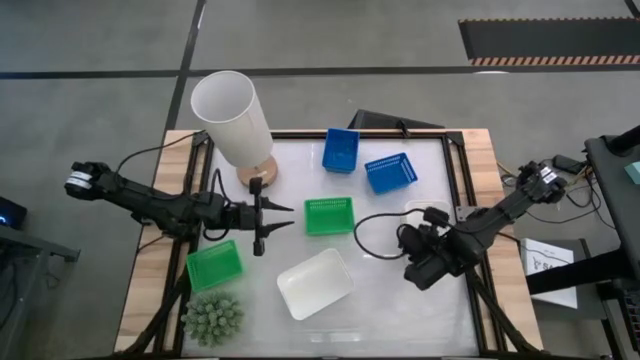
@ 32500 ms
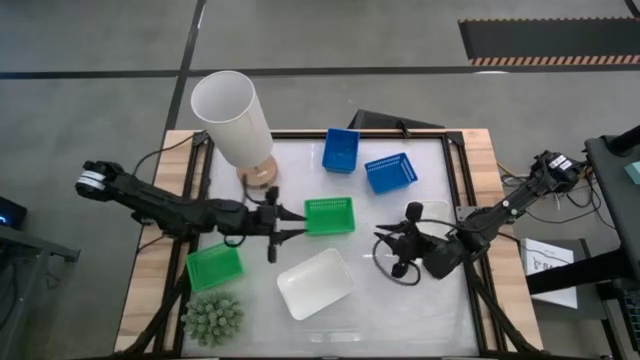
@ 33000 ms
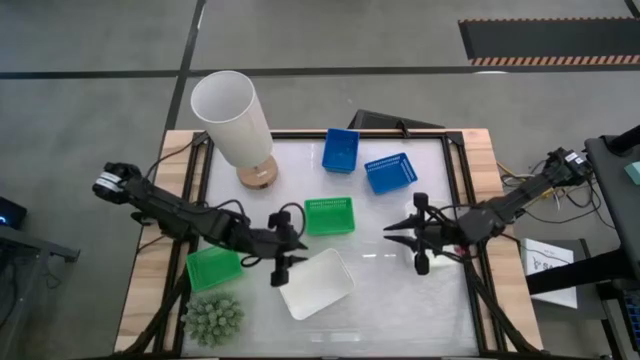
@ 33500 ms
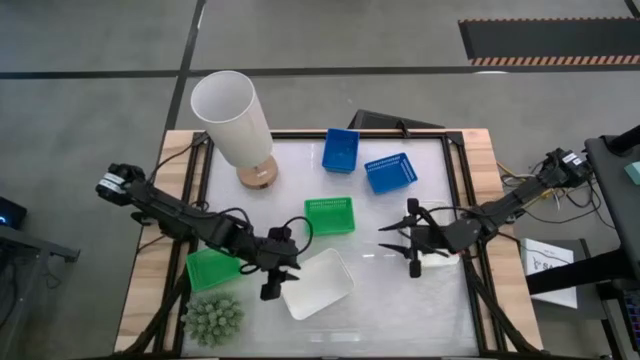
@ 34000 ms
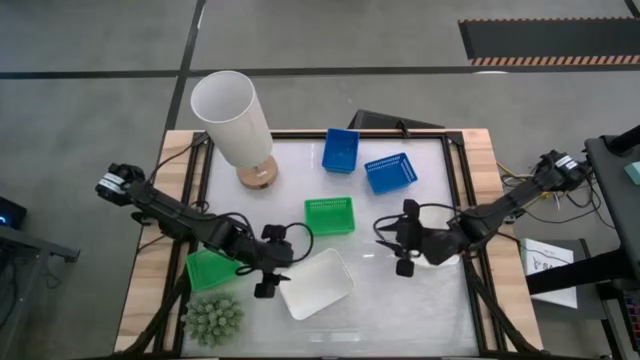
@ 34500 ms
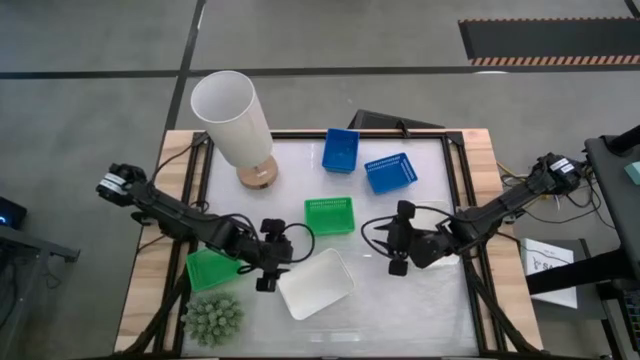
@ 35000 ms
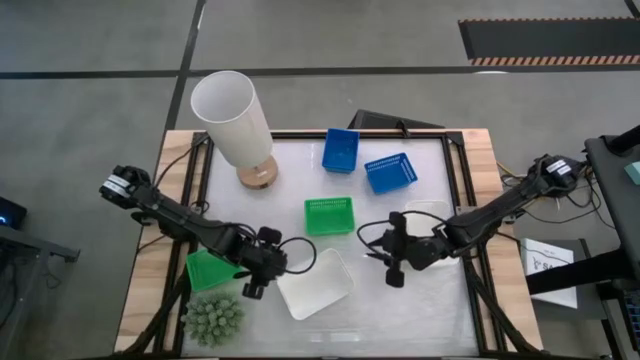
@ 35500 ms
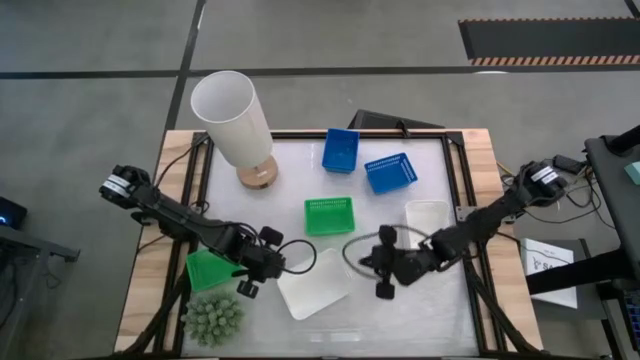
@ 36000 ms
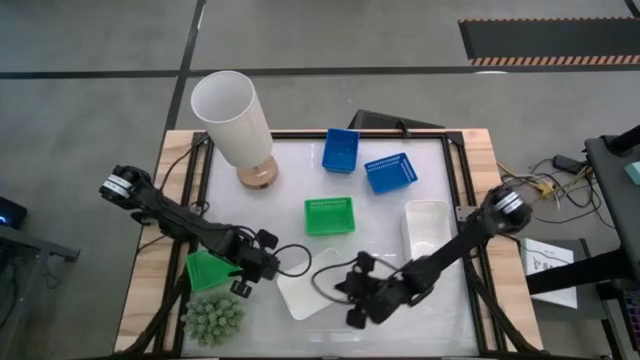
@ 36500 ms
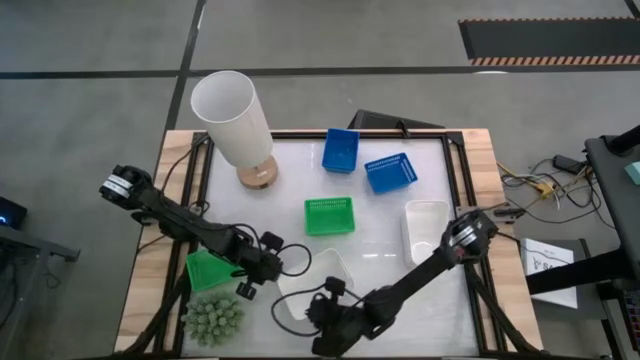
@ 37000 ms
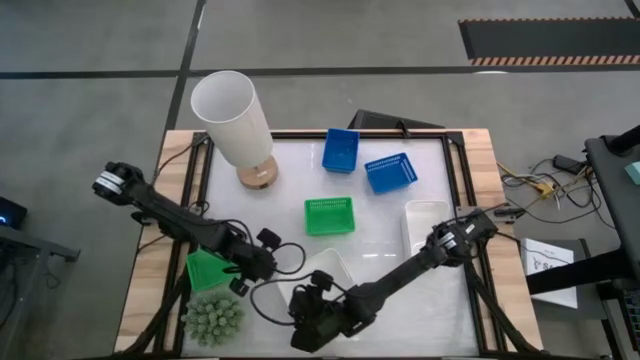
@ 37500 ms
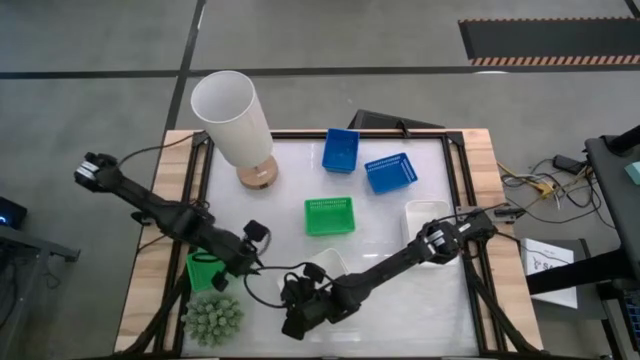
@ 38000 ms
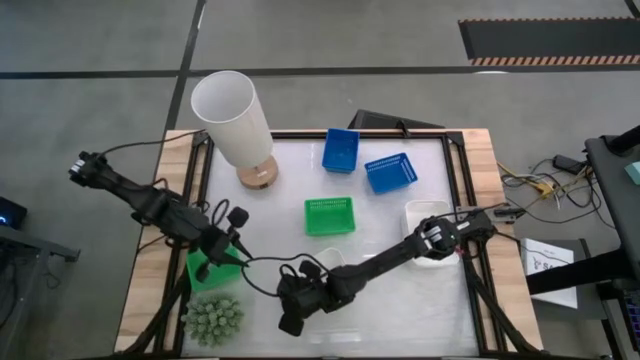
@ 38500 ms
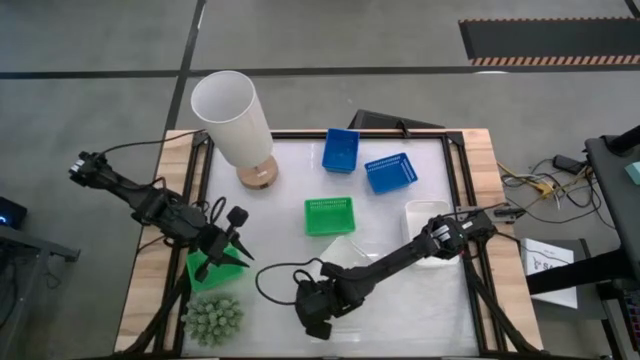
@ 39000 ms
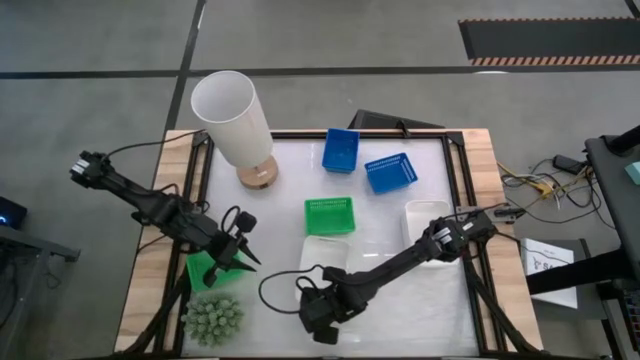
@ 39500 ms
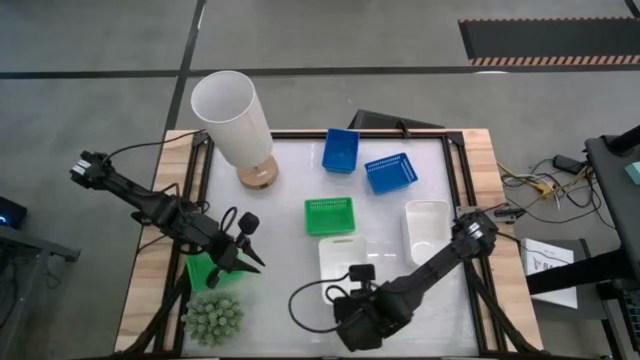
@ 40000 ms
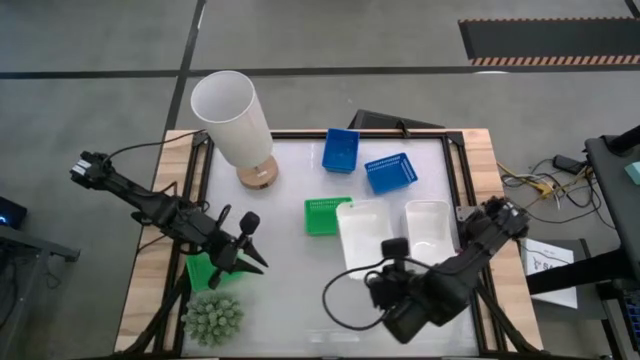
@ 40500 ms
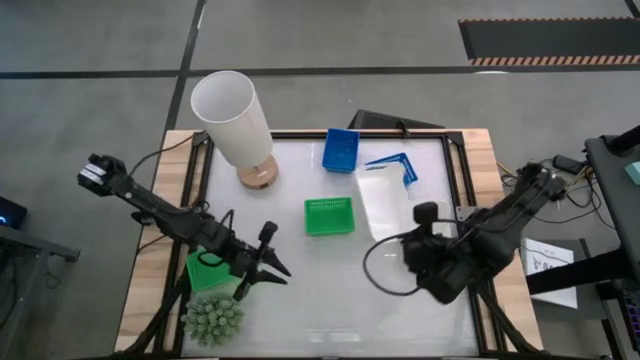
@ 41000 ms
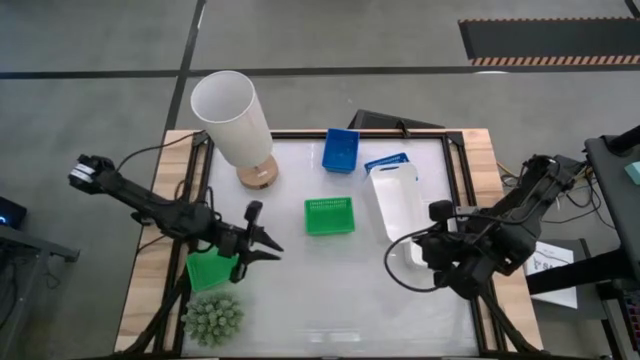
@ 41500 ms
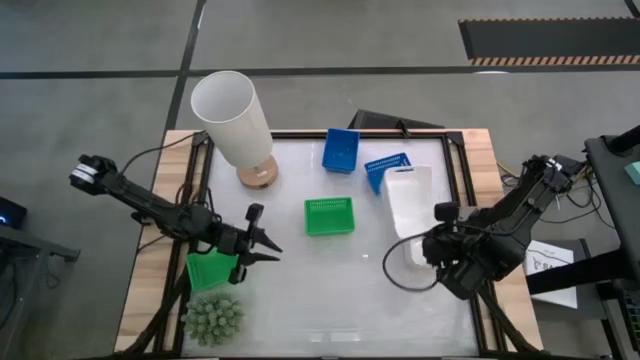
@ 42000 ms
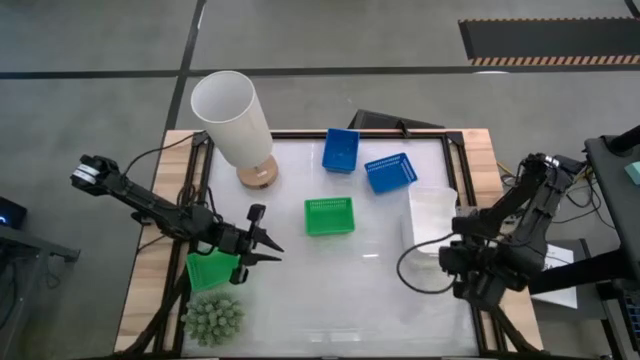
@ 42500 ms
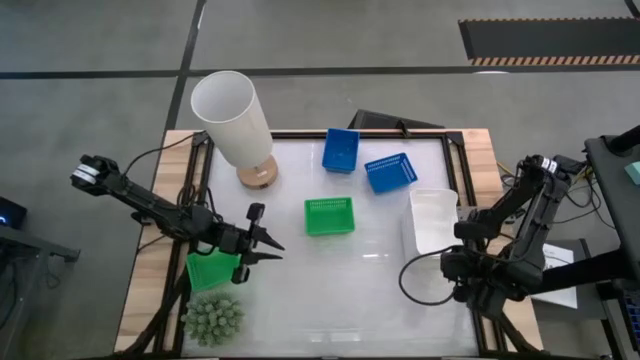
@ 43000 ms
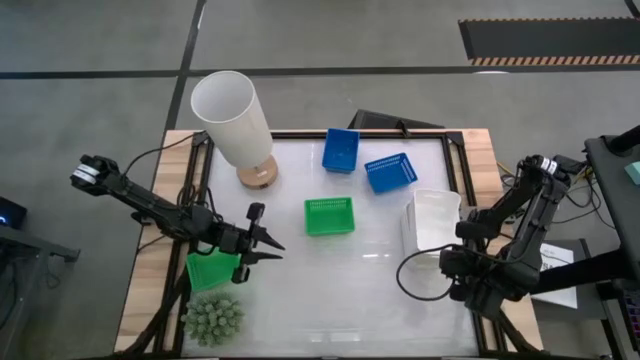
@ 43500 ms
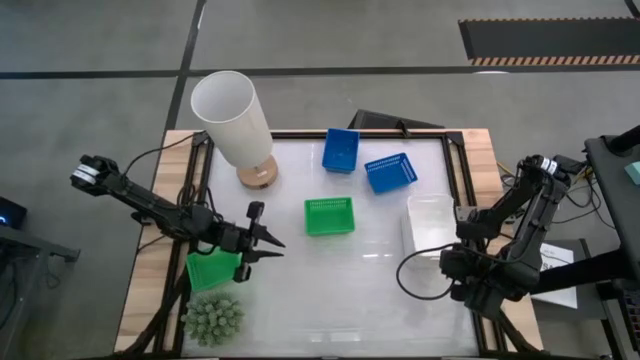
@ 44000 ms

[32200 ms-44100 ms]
Stack the left white bin on top of the right white bins

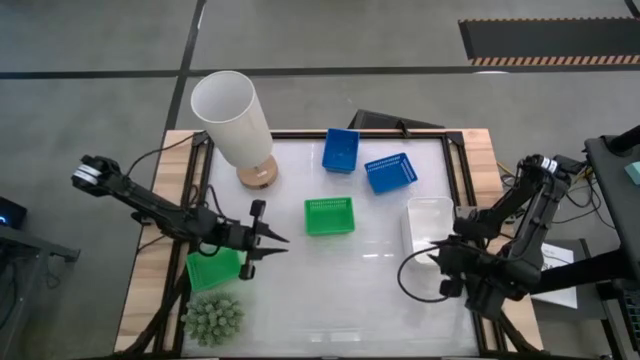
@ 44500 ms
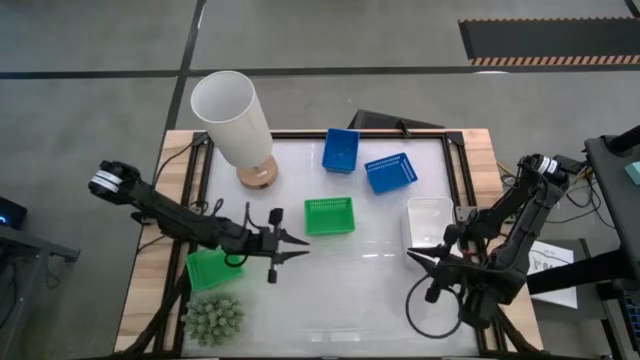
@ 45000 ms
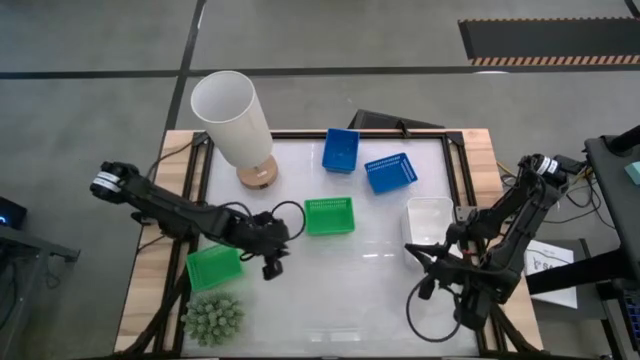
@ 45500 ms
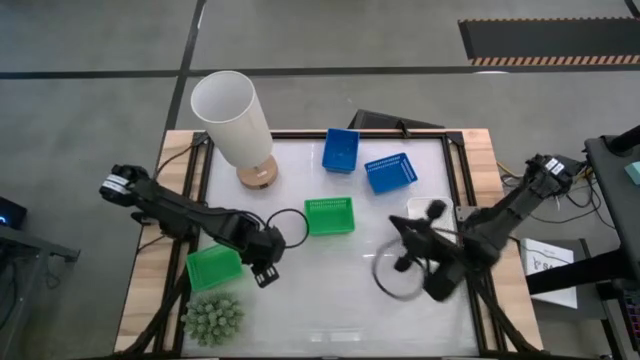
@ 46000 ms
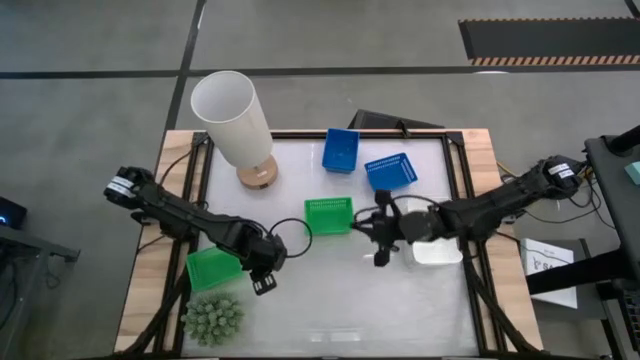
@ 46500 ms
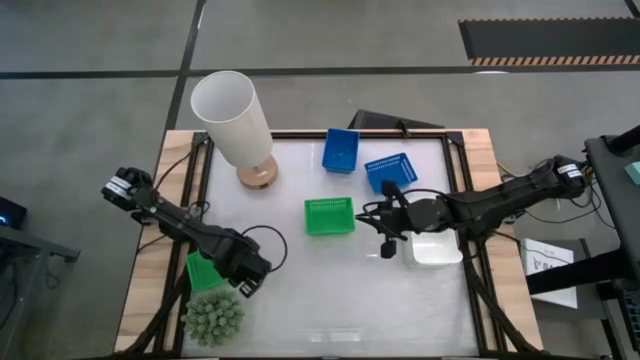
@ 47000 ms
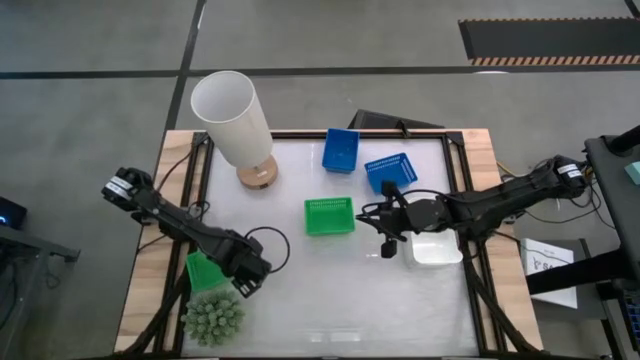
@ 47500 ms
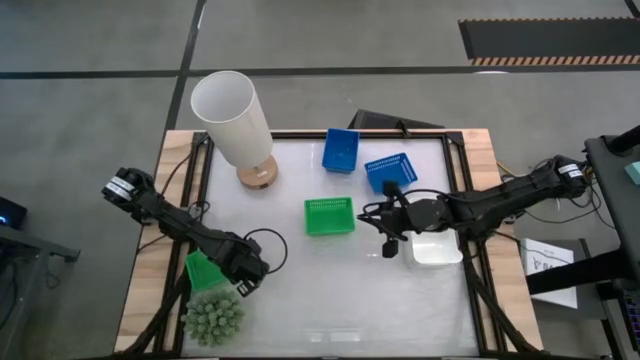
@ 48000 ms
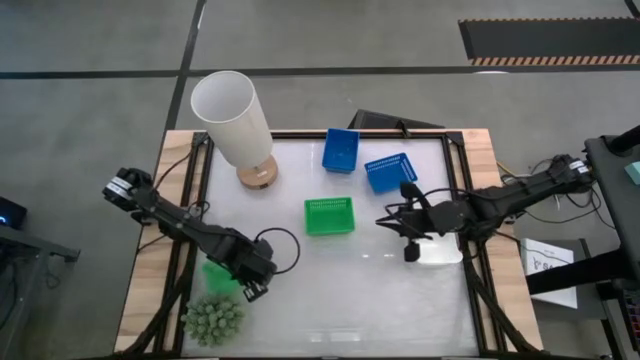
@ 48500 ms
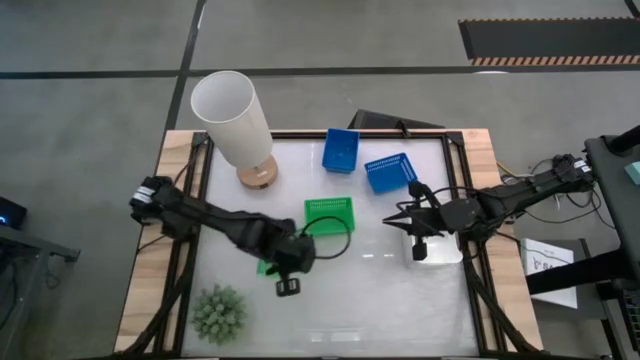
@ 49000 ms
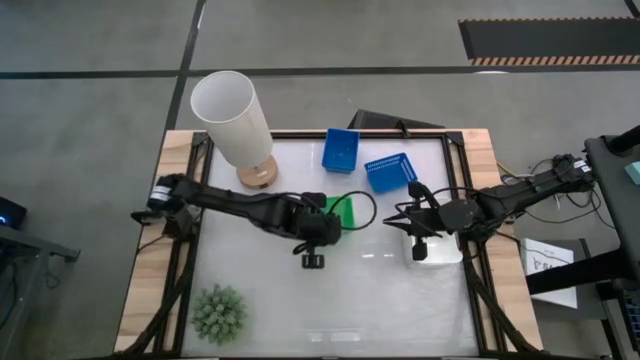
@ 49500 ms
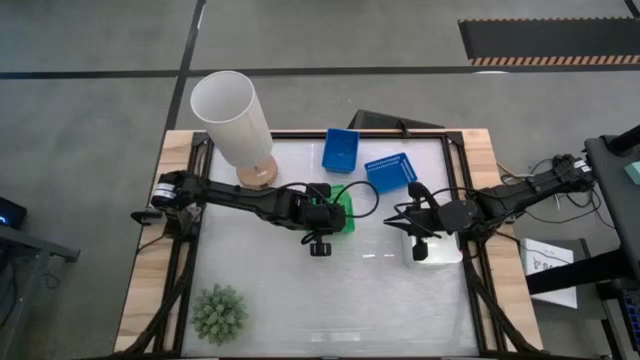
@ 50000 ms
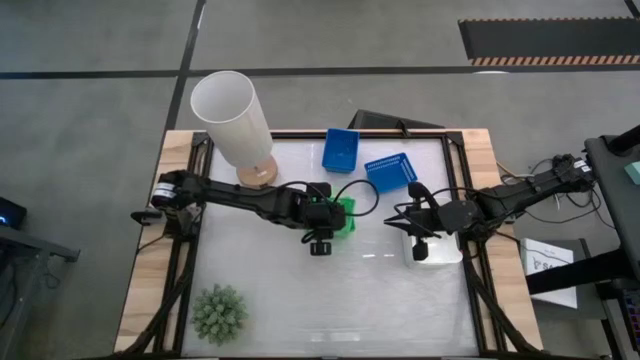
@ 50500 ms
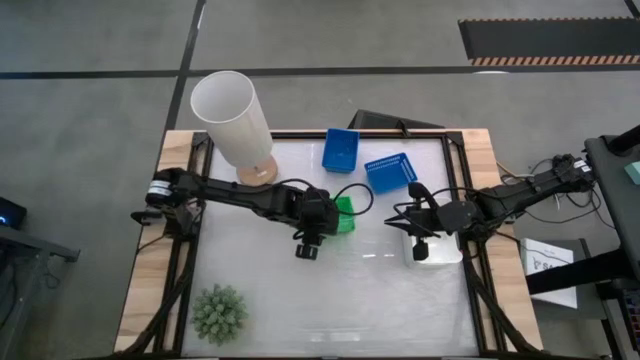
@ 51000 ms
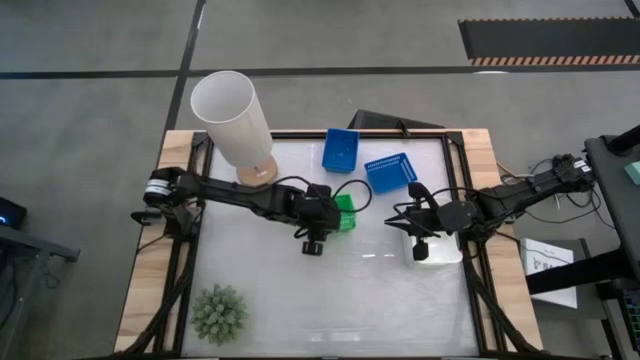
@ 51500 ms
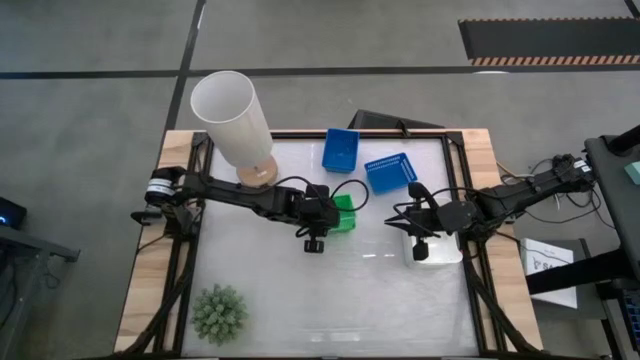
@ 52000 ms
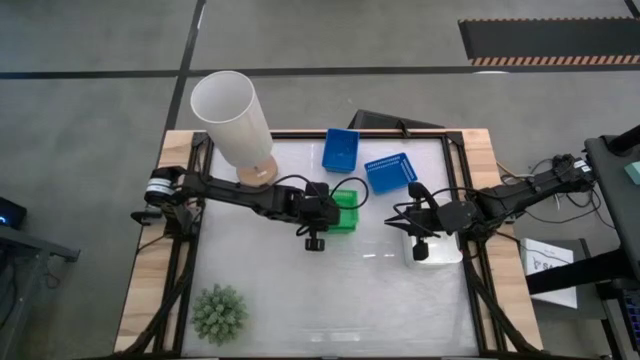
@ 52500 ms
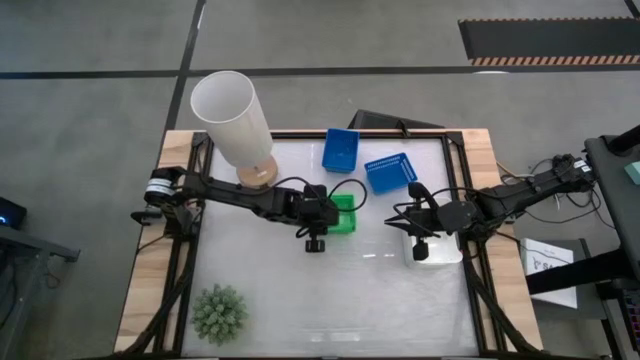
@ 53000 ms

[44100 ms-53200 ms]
Stack the bottom green bin on top of the top green bins
